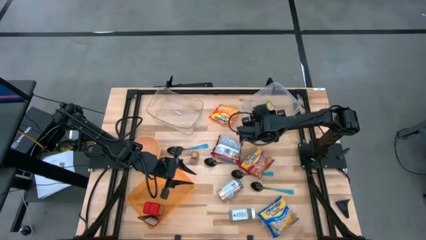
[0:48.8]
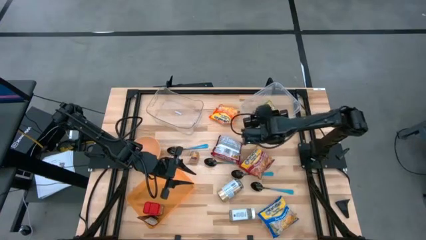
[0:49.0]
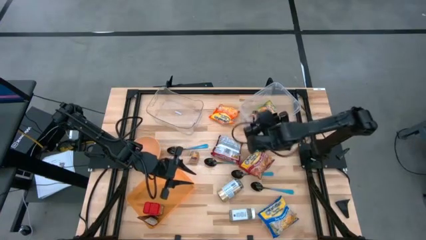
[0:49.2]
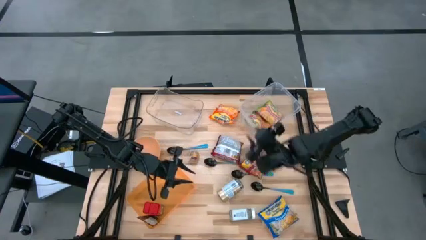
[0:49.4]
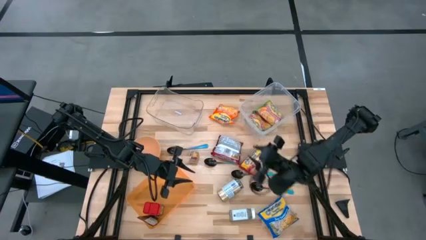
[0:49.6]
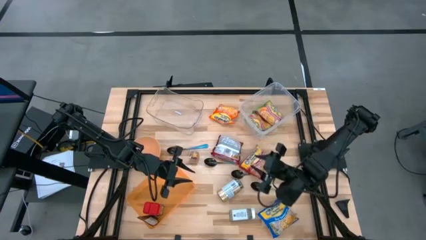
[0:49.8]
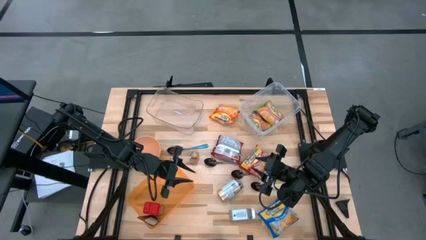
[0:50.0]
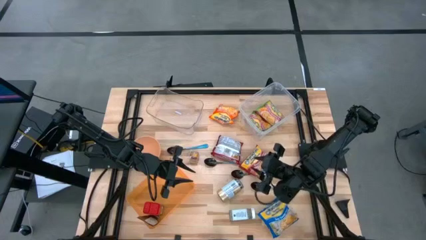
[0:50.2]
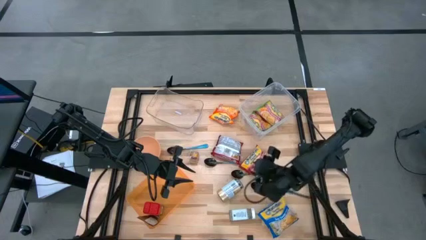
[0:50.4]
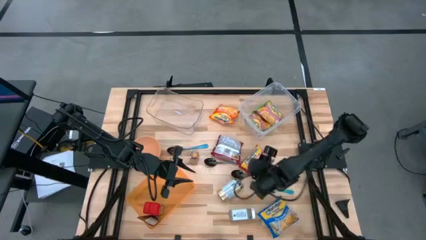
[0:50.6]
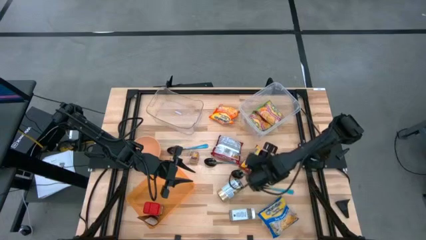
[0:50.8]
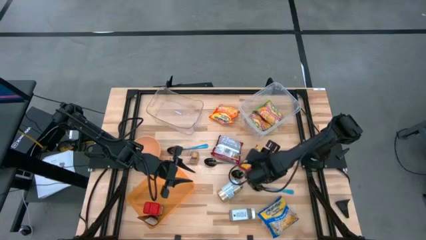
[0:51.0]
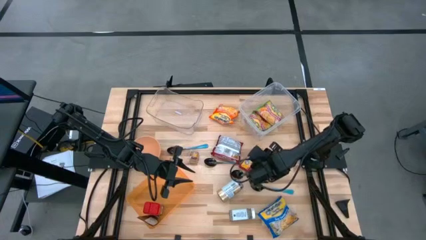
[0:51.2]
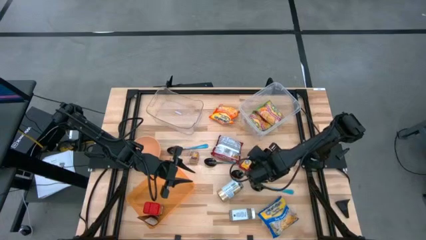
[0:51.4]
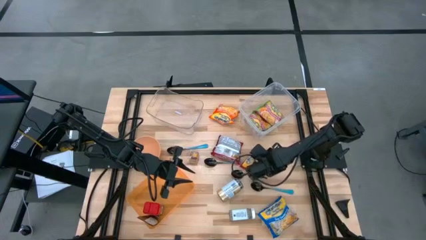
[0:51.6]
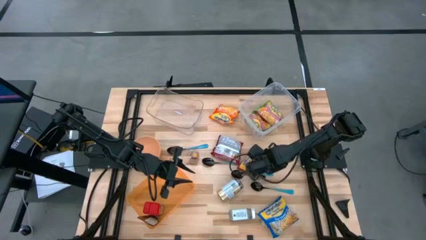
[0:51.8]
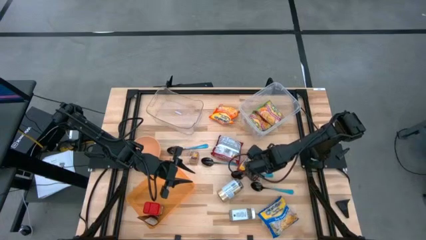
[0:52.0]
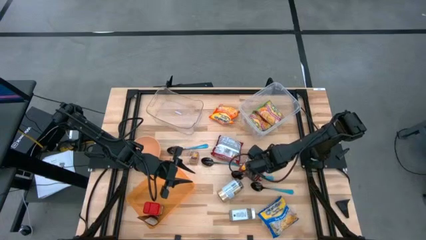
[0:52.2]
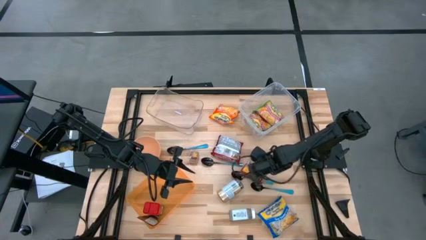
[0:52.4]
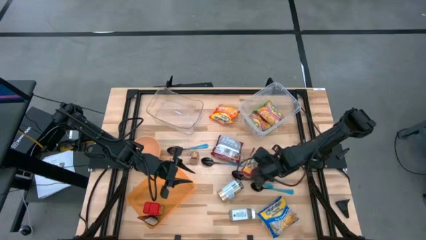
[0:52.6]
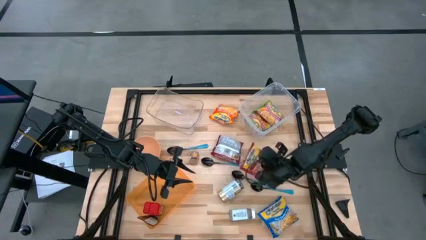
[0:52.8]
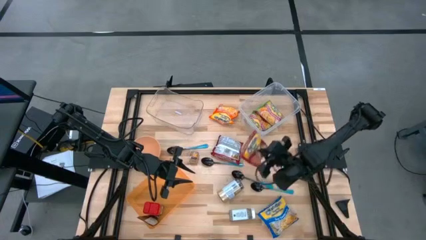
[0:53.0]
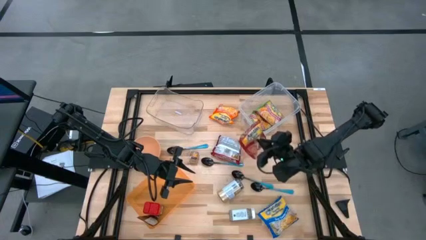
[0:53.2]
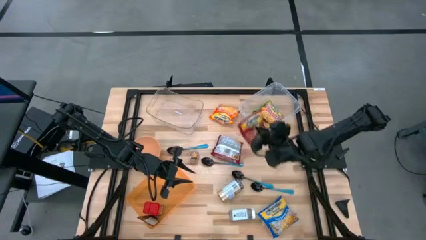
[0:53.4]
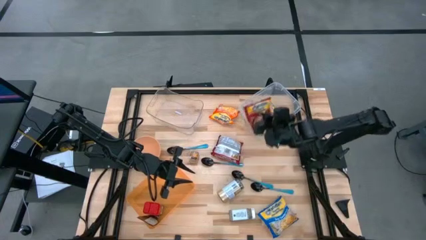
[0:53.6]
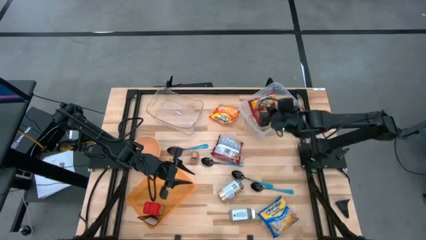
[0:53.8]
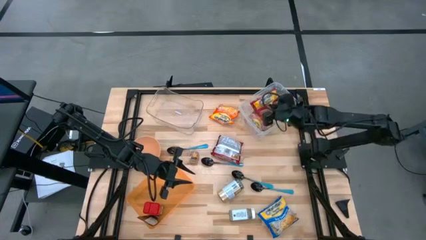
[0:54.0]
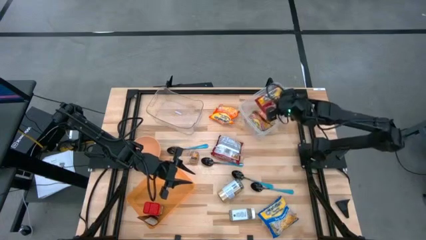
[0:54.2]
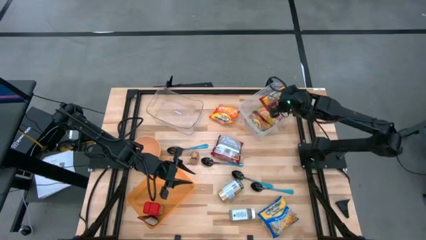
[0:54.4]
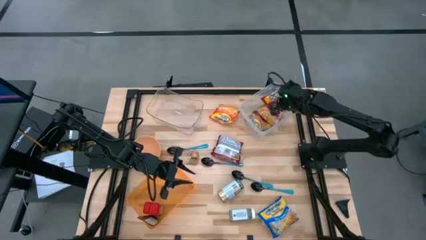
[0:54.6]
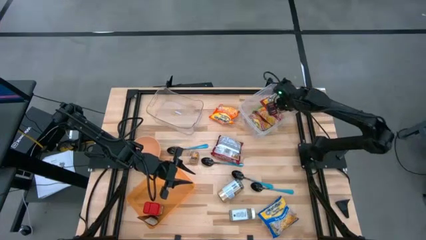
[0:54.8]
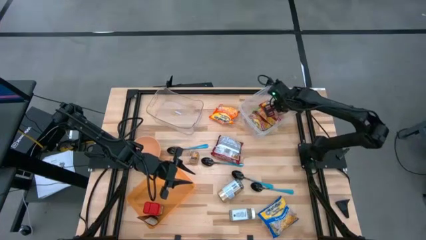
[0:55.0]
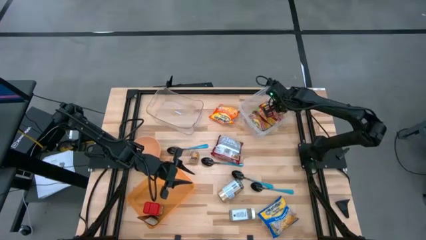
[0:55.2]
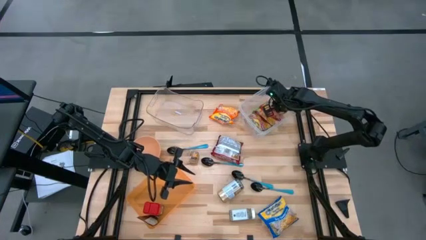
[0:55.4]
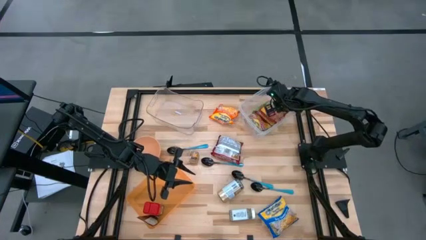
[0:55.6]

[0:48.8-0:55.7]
Task: Pick & Place Food Item
Put the red noodle pack into the right transparent bin

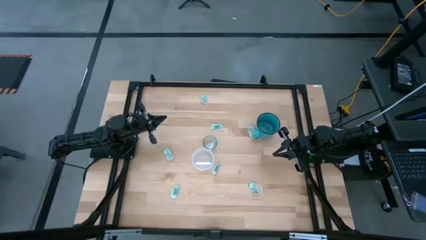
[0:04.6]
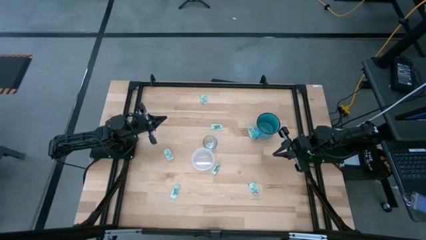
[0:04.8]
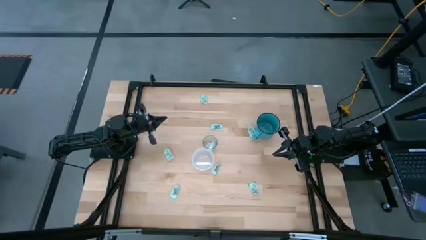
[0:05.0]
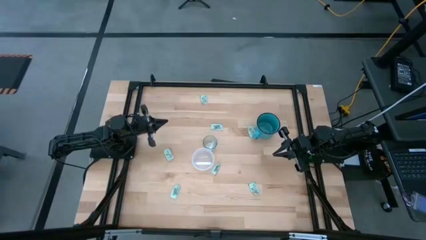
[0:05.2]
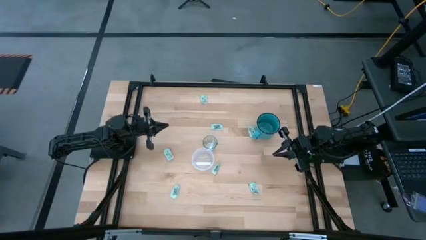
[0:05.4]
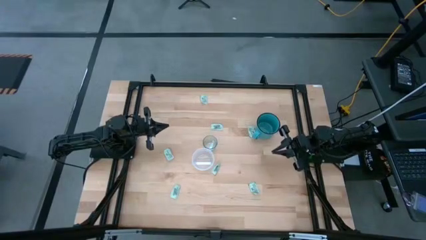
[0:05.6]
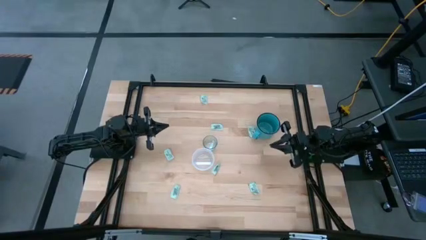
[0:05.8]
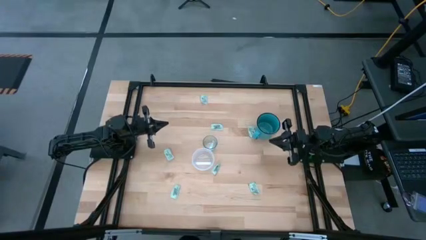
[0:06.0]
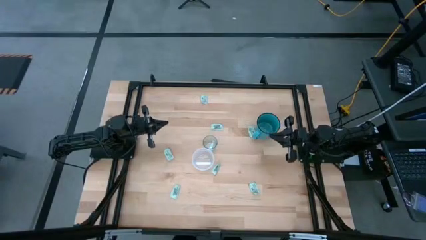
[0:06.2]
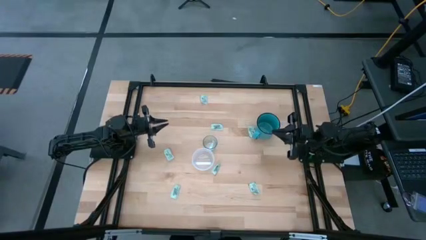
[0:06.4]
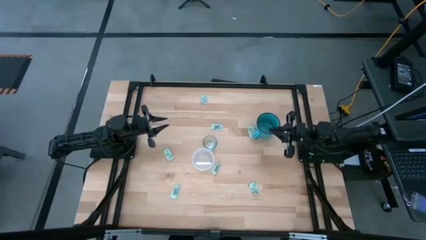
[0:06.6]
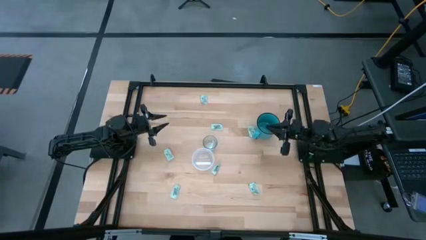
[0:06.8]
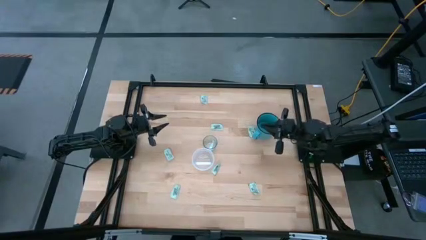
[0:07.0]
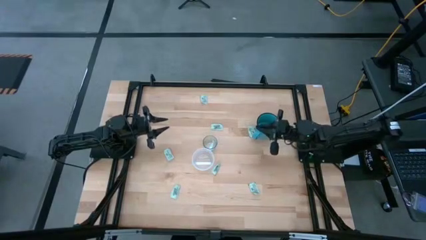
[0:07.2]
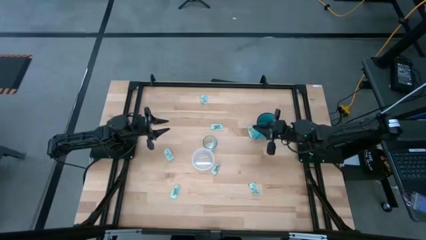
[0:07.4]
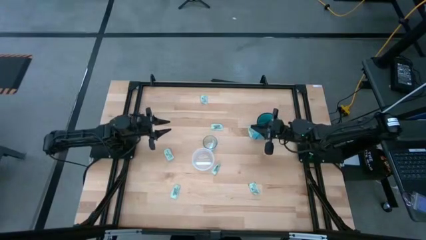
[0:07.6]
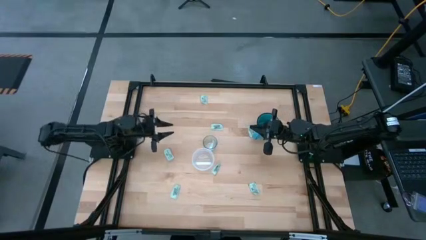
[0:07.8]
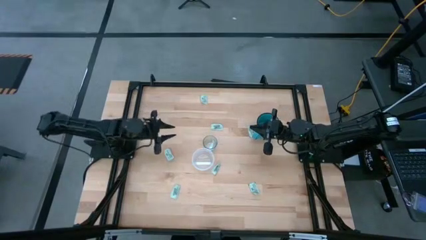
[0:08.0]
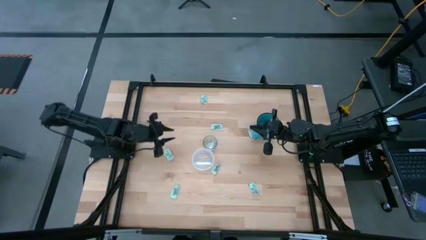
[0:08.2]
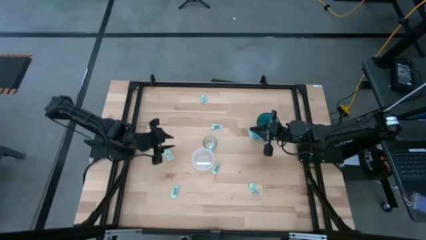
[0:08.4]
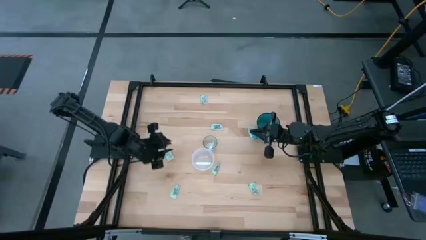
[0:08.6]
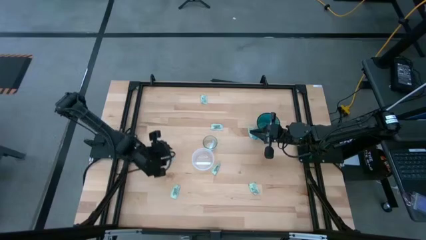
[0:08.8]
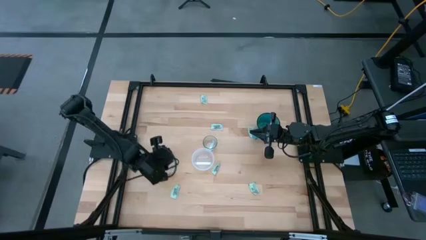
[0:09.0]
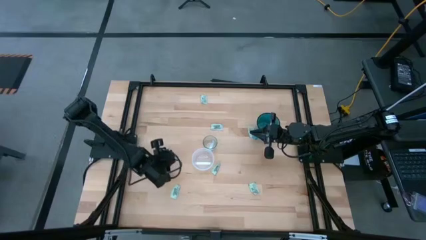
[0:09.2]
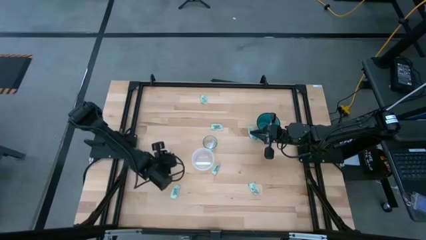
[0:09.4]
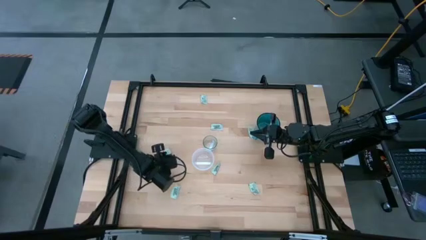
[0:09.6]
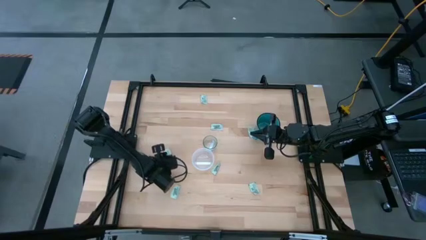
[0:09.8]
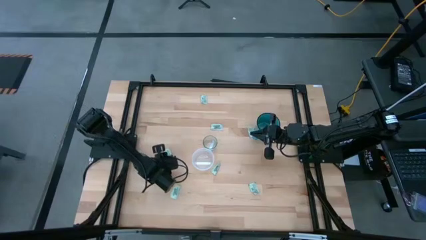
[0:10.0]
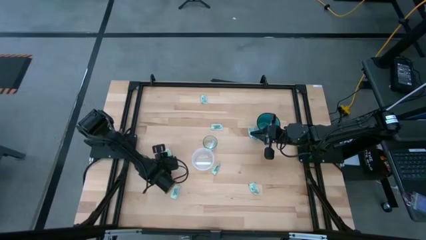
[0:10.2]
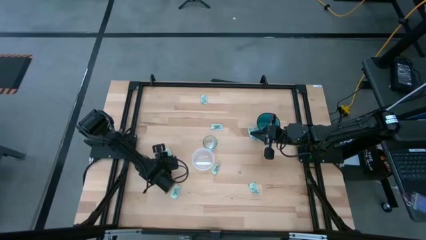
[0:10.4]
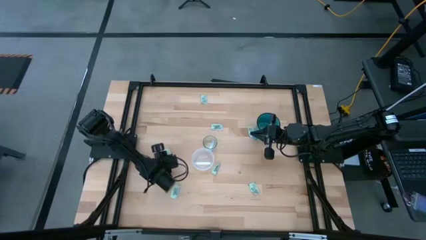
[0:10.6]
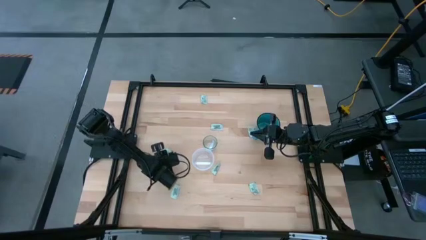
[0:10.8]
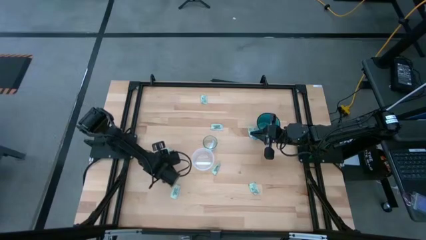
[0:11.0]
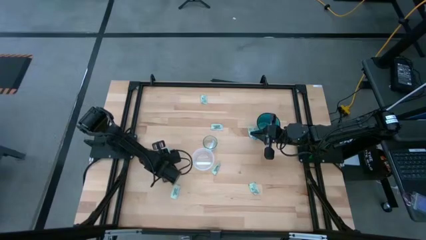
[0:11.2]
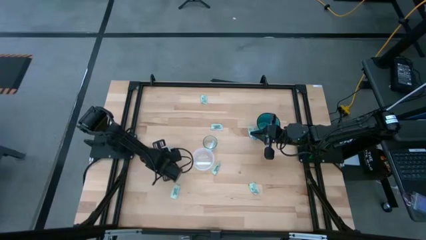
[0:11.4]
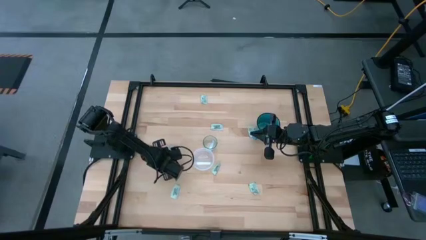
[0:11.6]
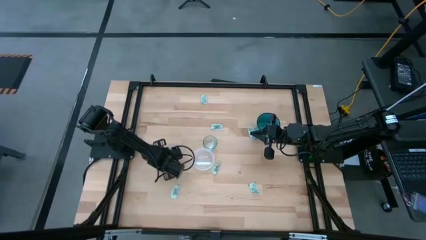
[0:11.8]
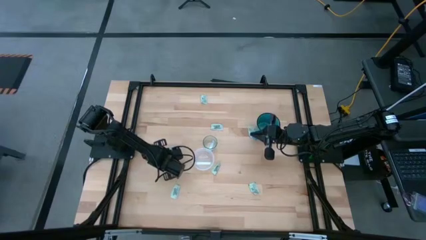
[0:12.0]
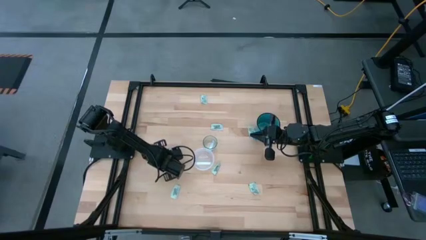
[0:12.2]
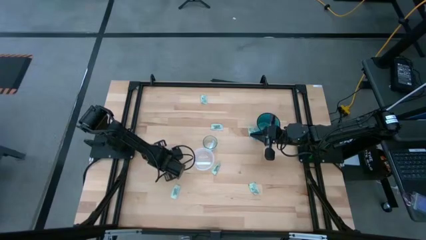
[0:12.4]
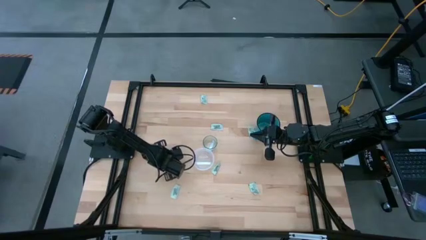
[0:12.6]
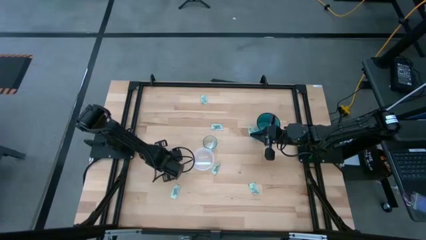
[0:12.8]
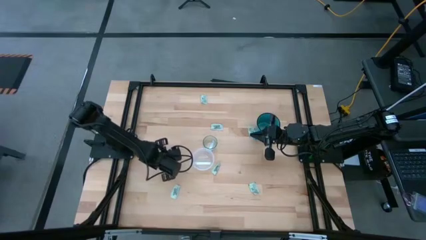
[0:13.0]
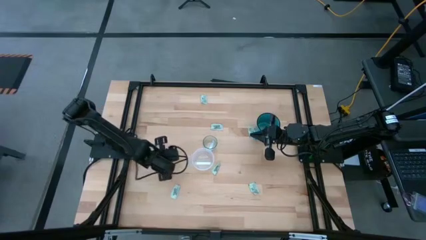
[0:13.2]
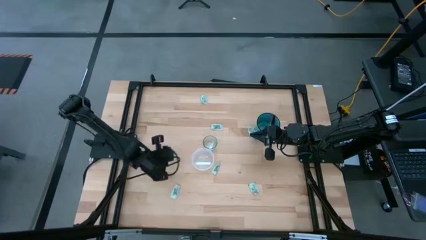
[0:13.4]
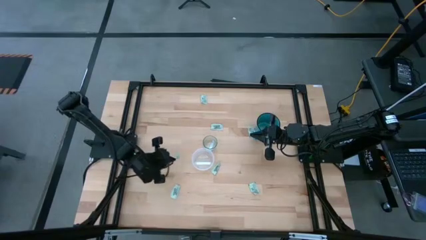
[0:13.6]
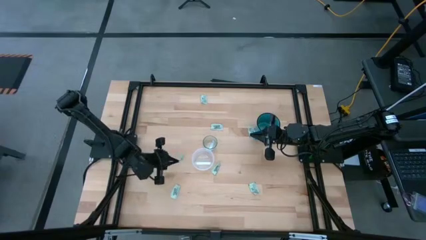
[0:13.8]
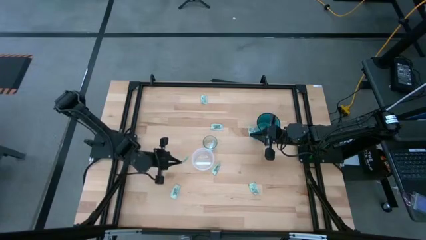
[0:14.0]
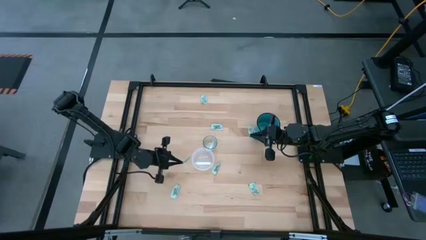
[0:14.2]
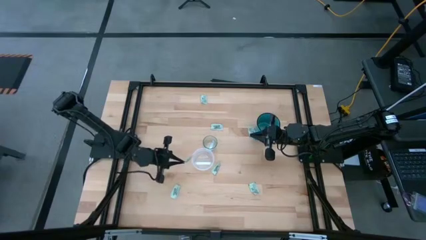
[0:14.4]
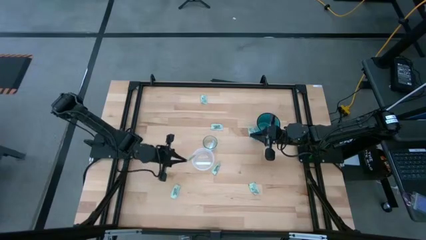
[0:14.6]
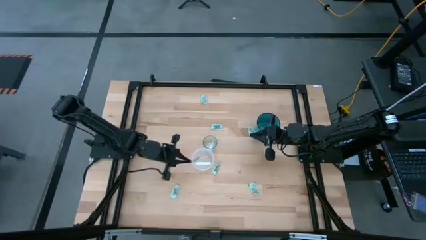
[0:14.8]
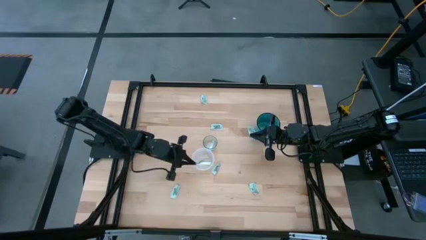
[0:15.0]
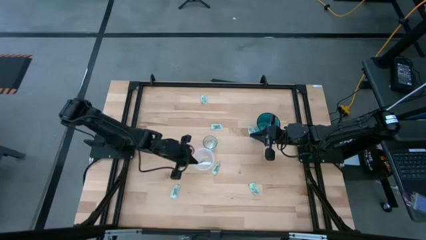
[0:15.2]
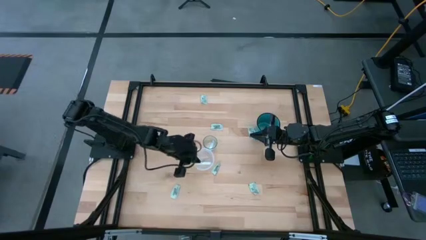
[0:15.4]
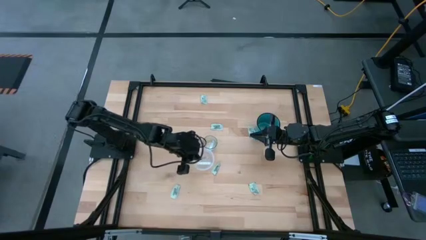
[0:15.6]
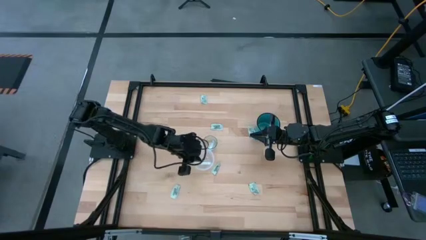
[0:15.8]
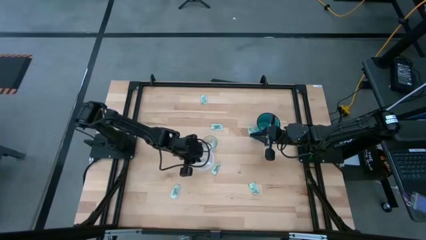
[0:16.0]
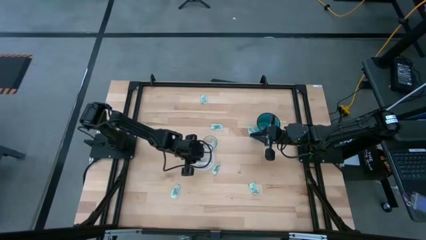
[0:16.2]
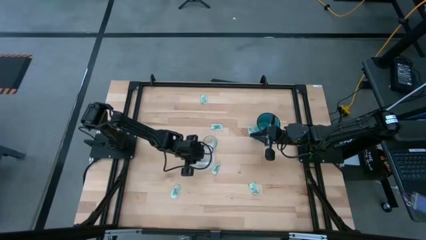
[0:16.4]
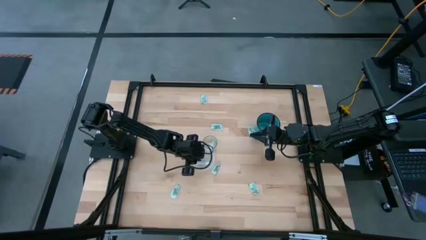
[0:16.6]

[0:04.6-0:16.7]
Task: Pick and place items into bin
Put the transparent stevia packet into the transparent bin
